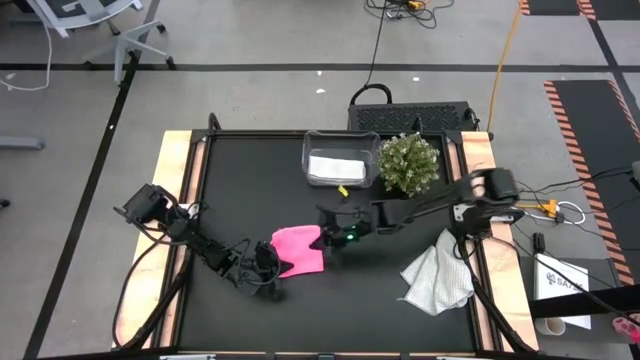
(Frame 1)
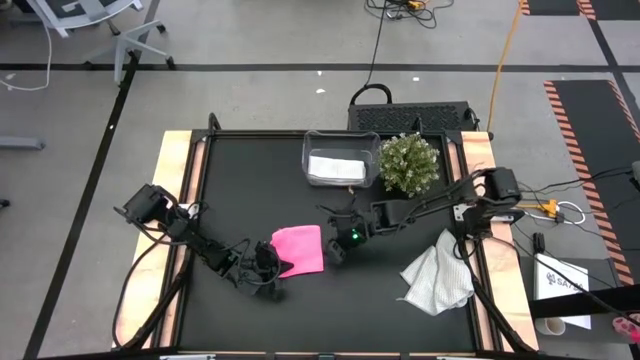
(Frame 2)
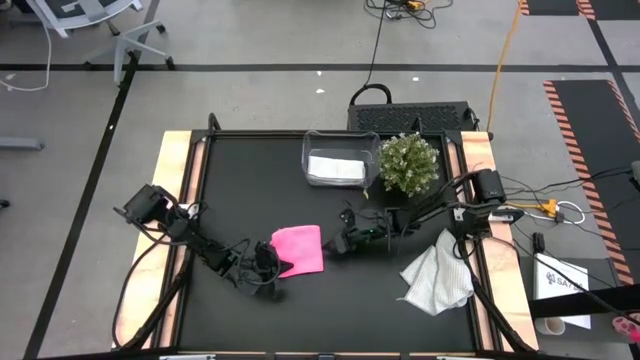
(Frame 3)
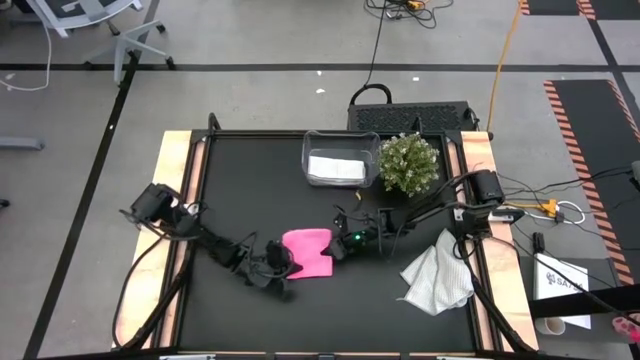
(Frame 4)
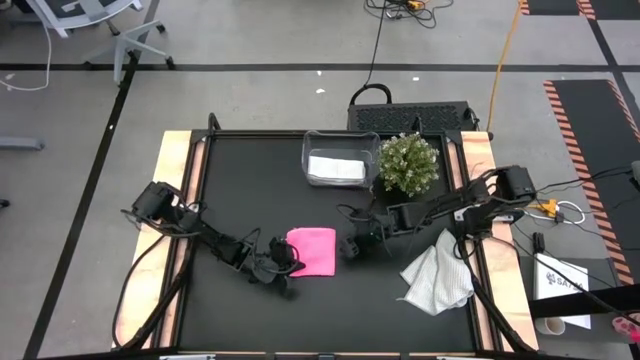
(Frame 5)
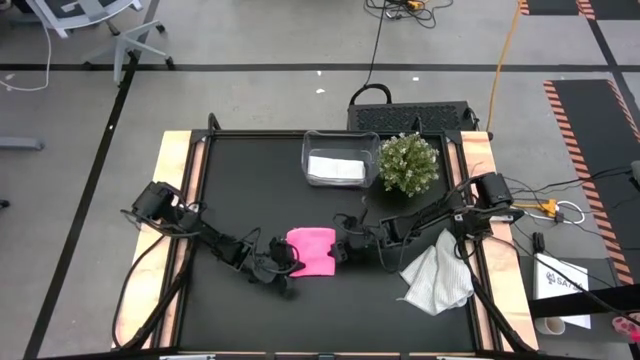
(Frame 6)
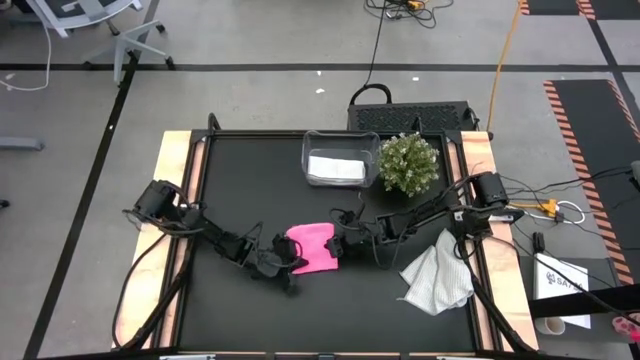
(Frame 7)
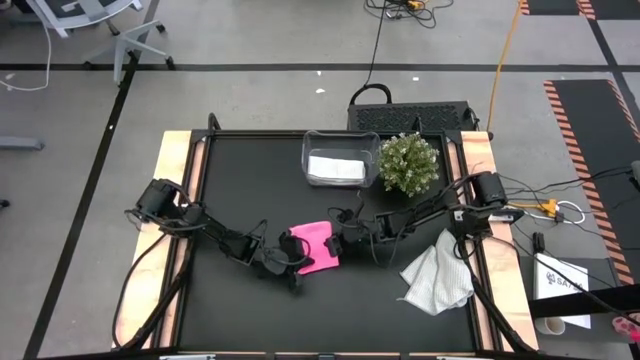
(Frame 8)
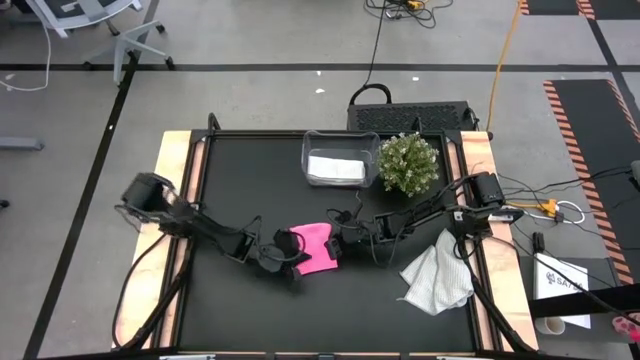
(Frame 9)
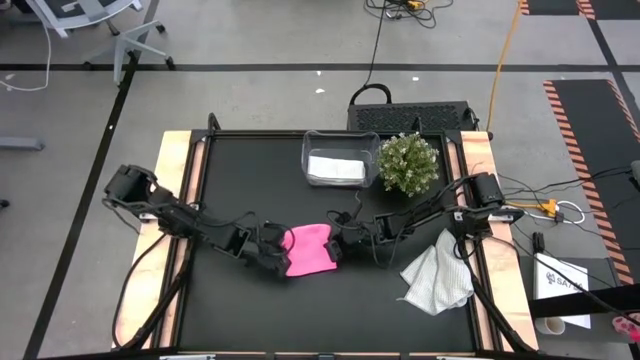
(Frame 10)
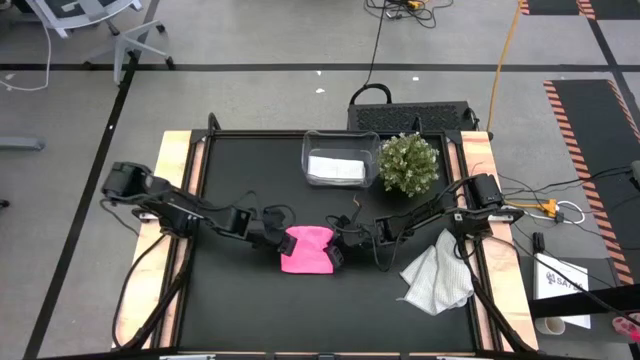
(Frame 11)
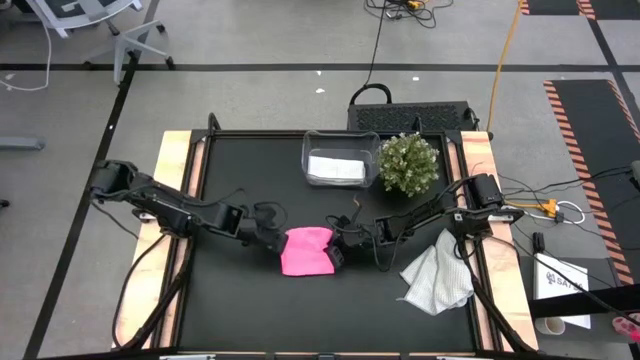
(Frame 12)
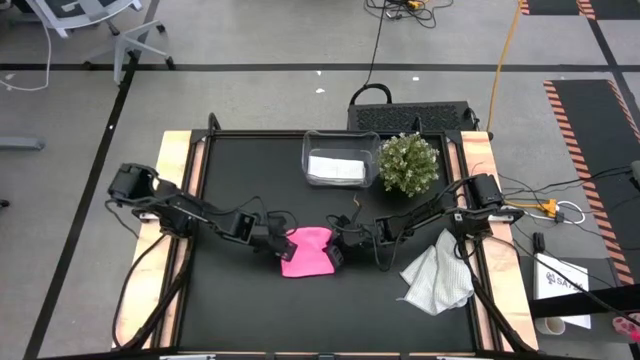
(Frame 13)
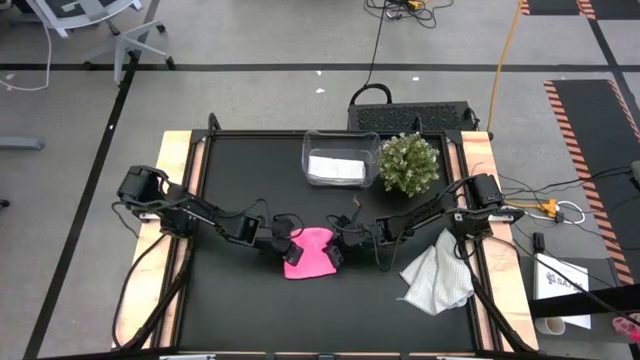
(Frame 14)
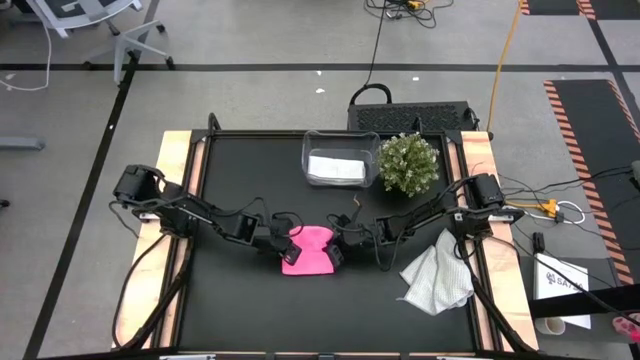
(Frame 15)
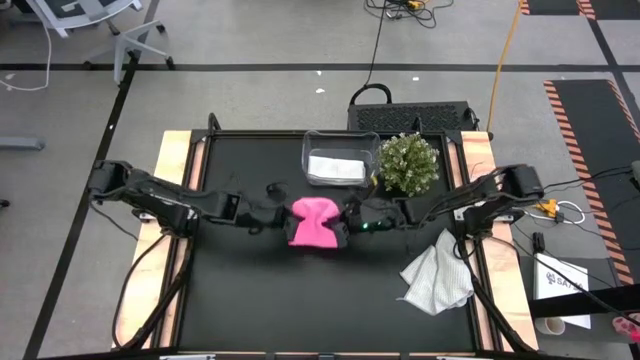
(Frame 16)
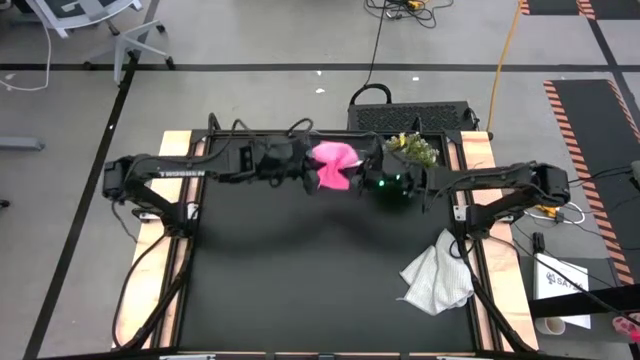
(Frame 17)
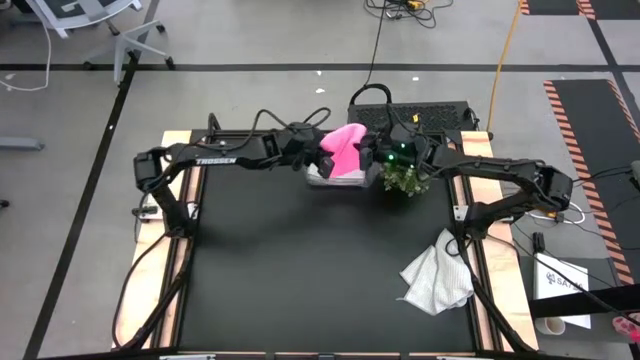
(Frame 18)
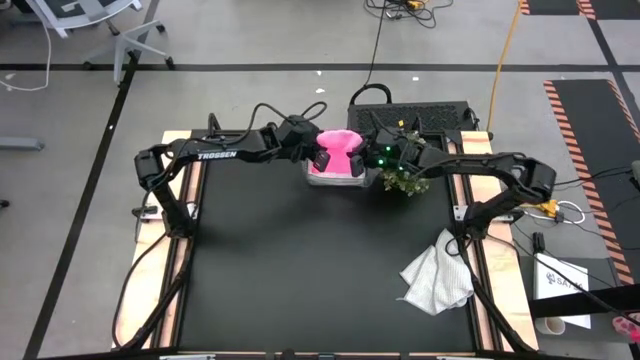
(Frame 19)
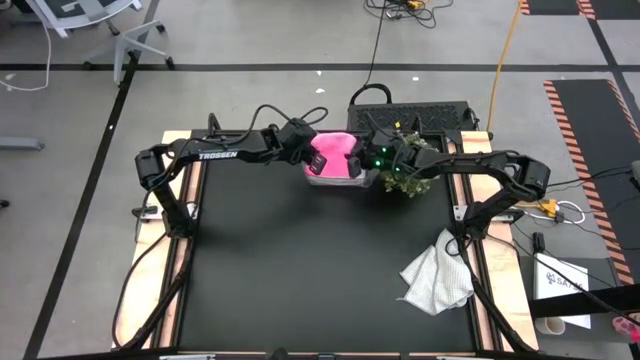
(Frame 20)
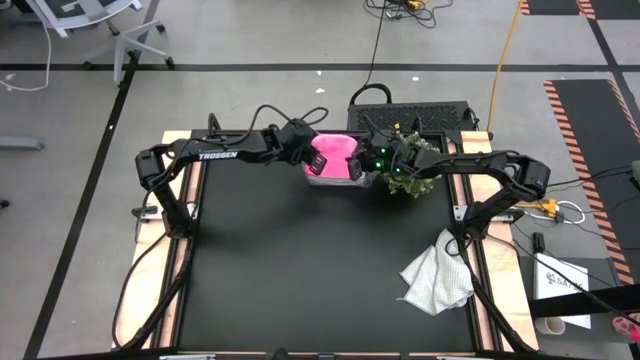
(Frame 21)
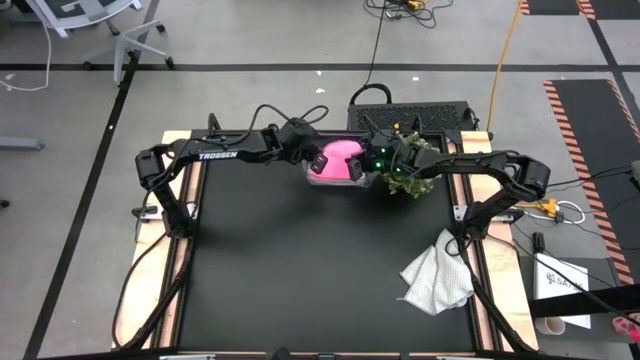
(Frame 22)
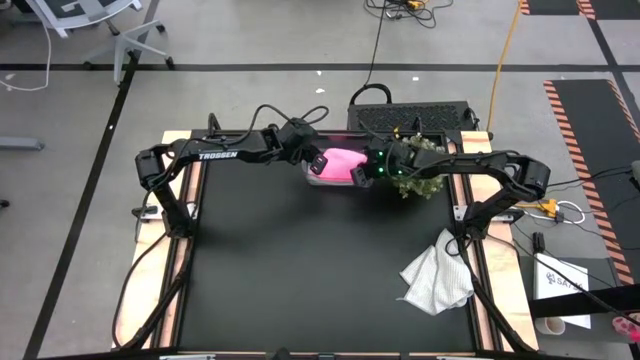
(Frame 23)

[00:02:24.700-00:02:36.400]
Task: Fold microfiber towels
Put the folded pink towel into the transparent bin

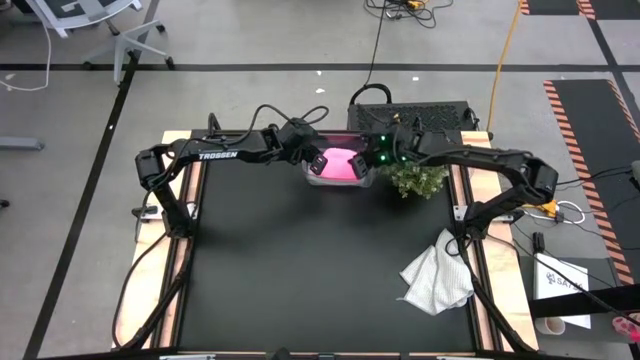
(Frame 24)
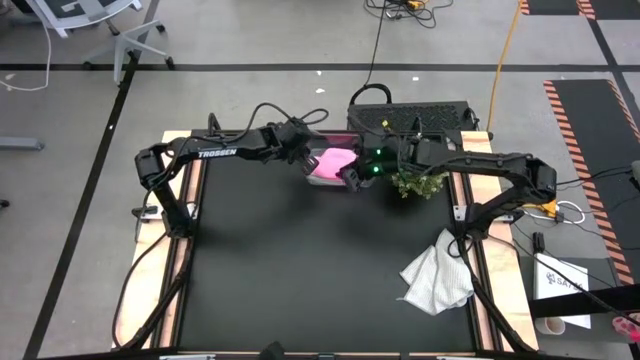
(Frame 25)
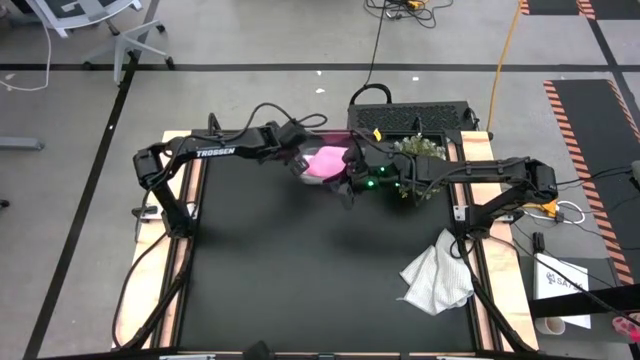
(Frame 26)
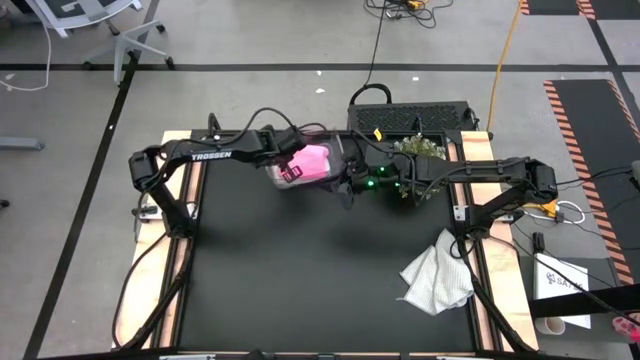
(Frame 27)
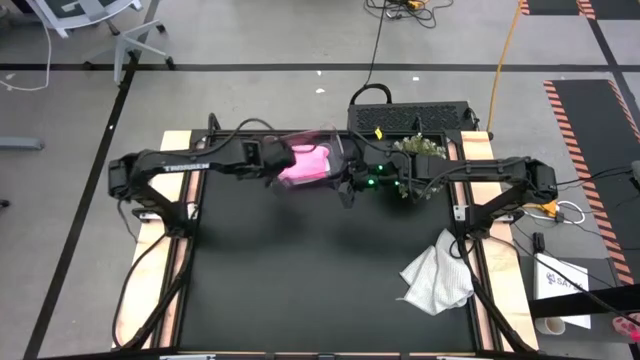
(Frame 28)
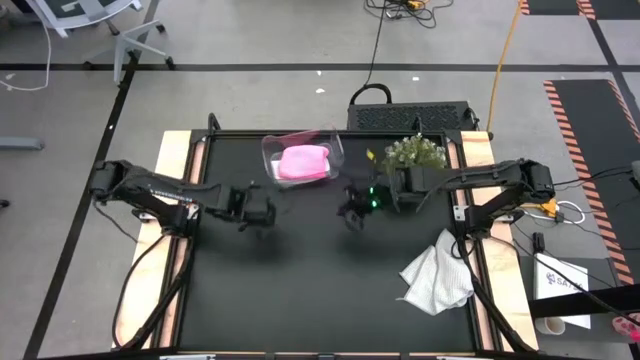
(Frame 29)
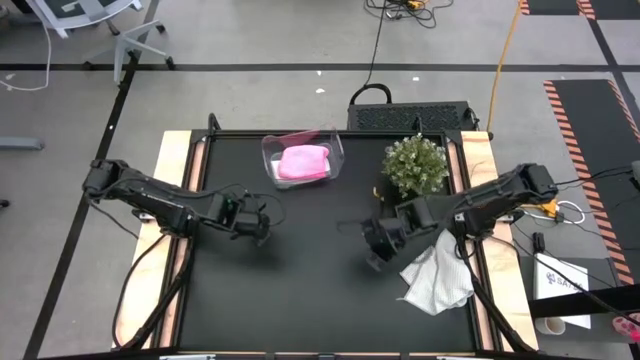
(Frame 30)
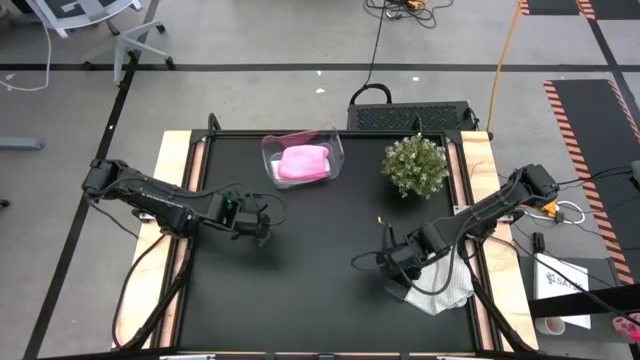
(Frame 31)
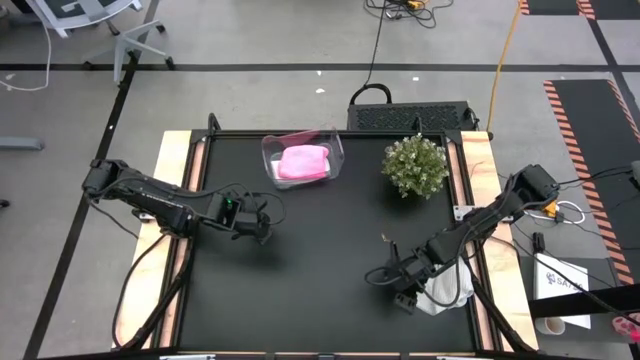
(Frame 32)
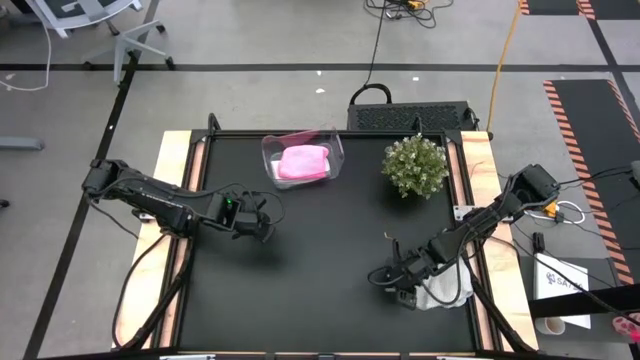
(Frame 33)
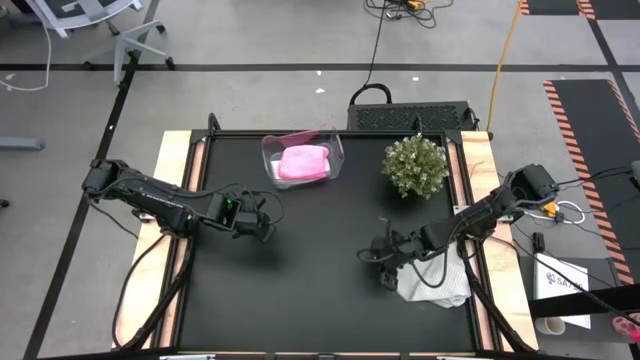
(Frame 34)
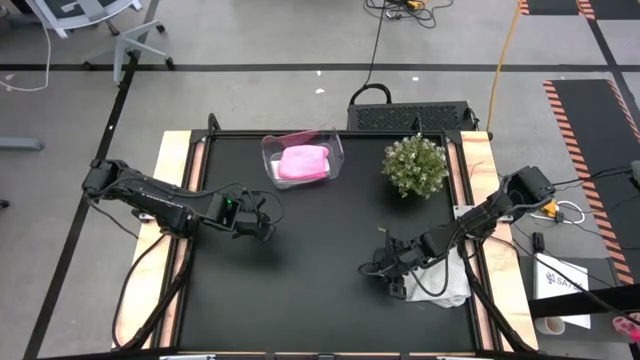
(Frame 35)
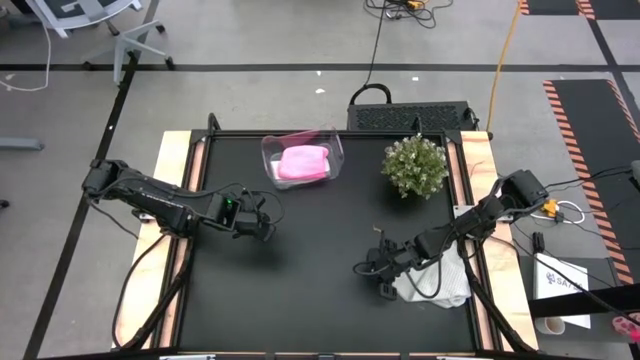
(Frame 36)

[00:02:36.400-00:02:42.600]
Fold the gray towel

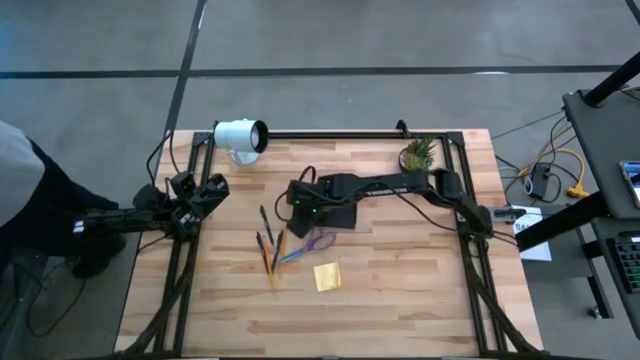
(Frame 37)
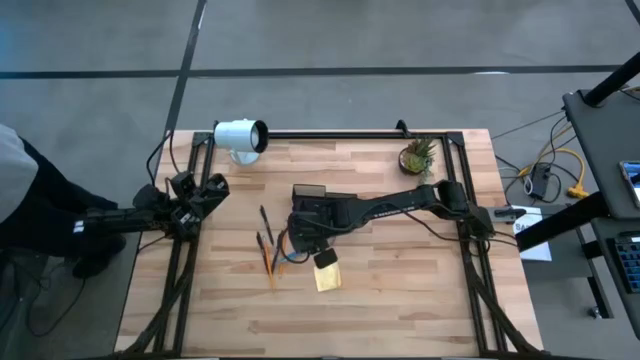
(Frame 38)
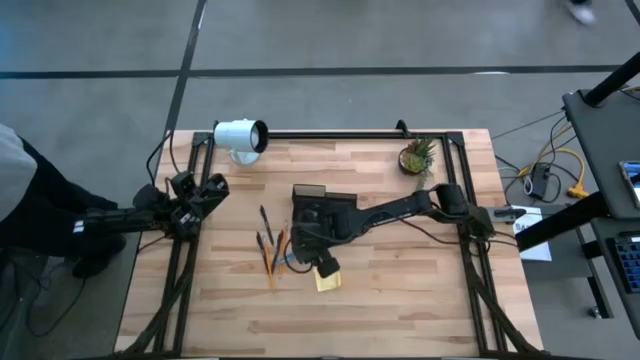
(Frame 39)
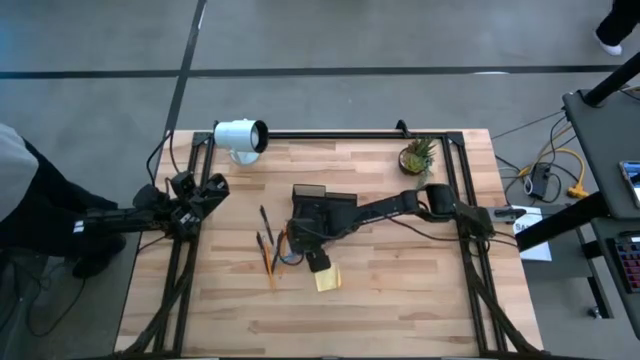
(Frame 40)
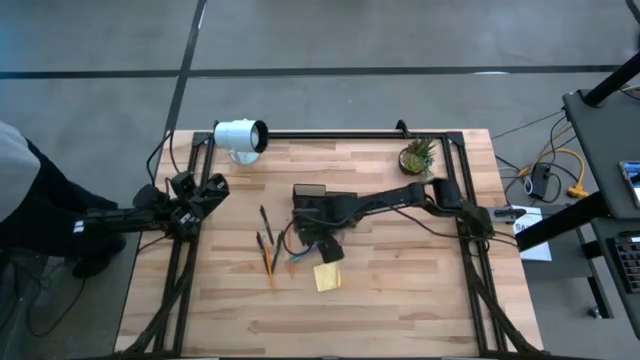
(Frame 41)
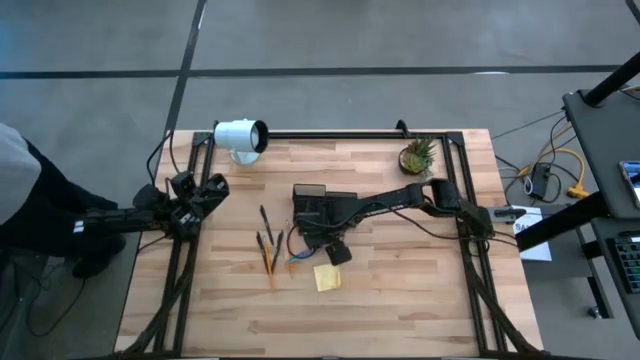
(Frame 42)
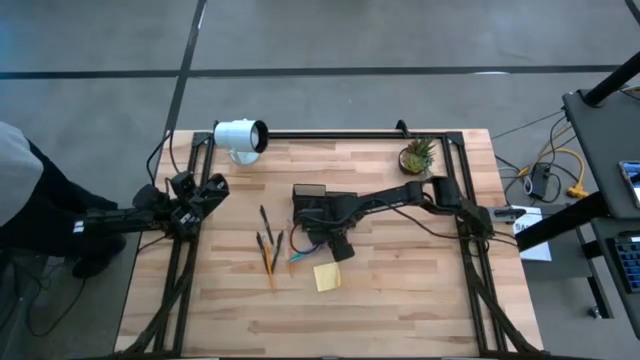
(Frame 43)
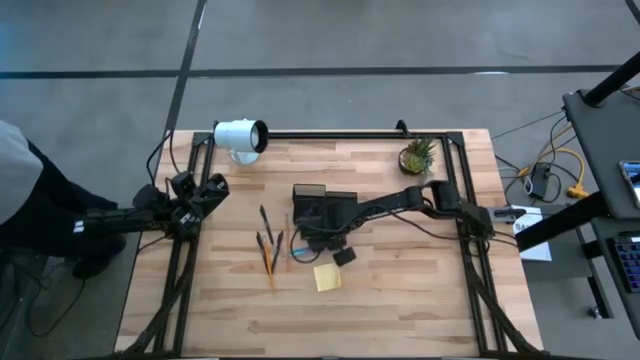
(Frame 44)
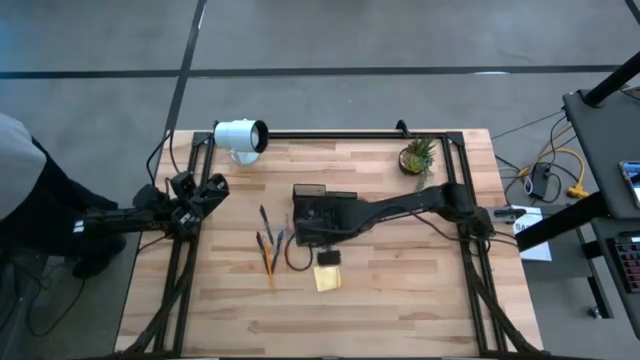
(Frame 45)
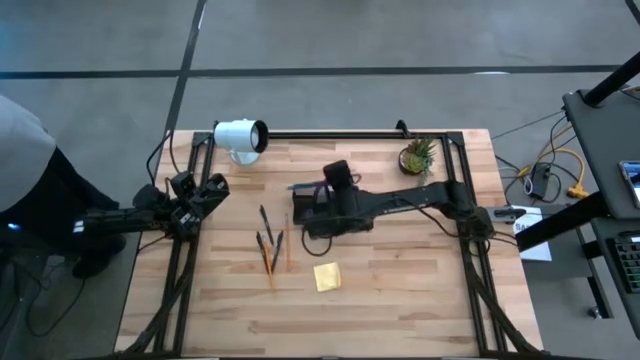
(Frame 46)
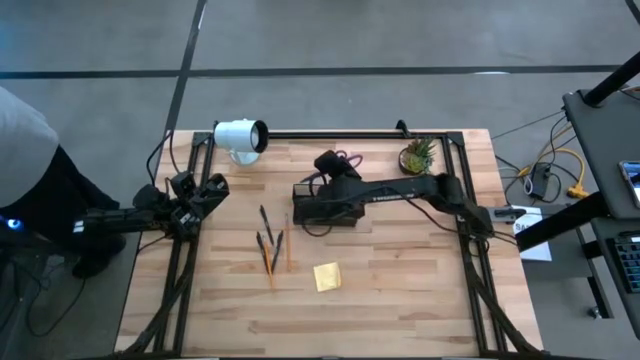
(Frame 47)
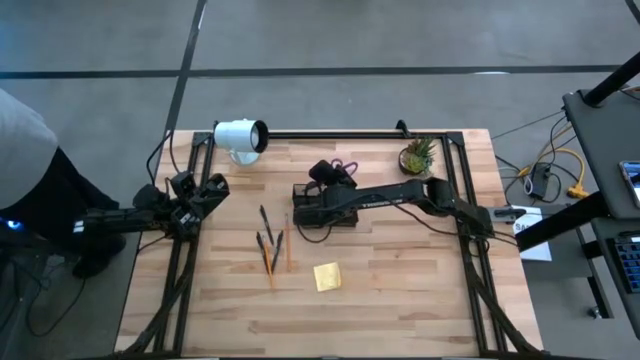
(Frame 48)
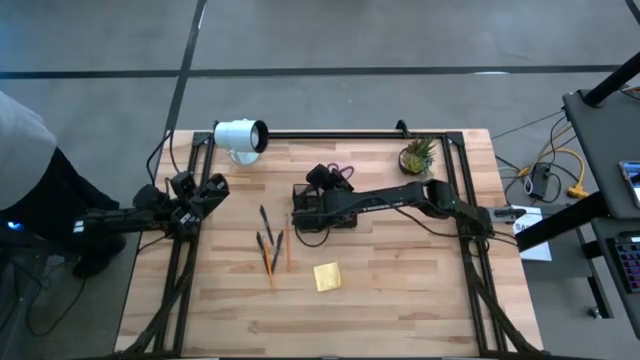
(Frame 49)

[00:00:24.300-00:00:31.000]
Task: Pick and place office supplies into organizer
Put the purple scissors into the black desk organizer
